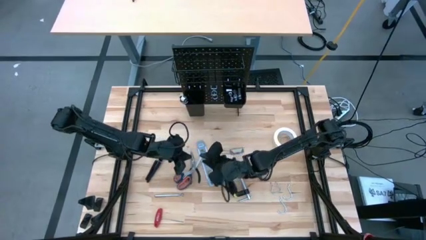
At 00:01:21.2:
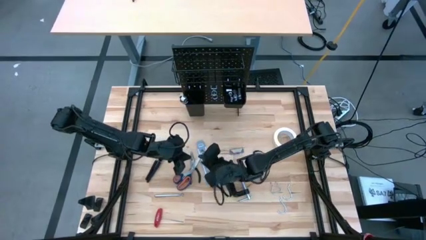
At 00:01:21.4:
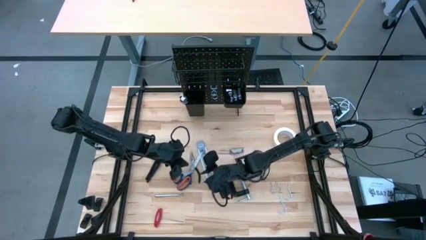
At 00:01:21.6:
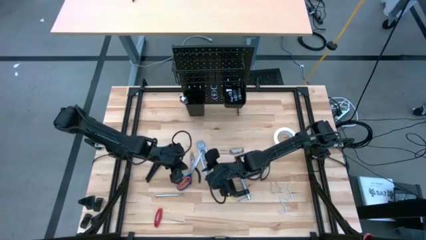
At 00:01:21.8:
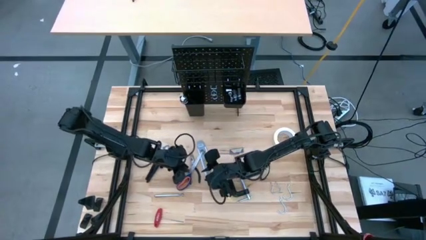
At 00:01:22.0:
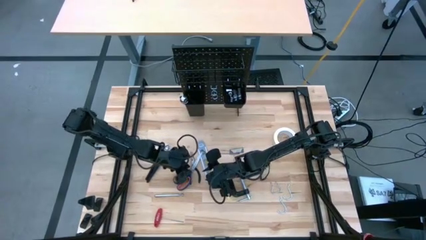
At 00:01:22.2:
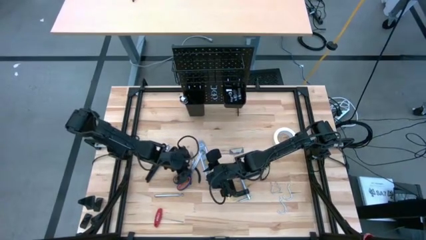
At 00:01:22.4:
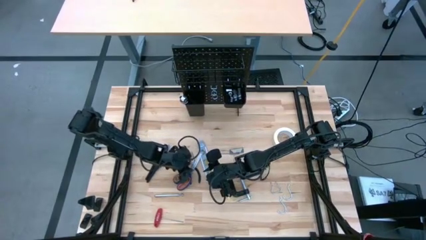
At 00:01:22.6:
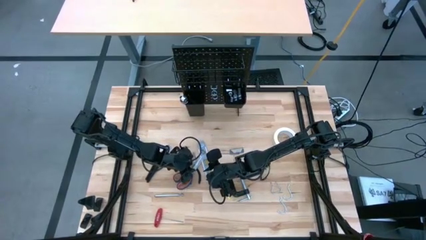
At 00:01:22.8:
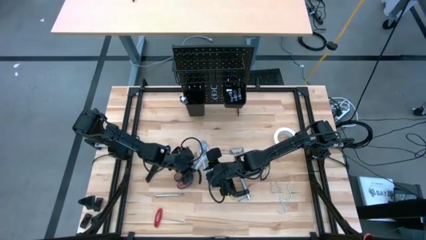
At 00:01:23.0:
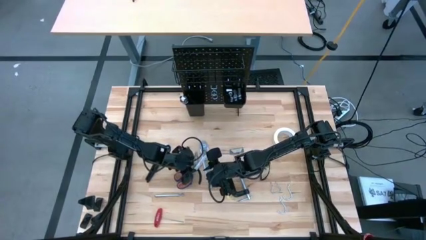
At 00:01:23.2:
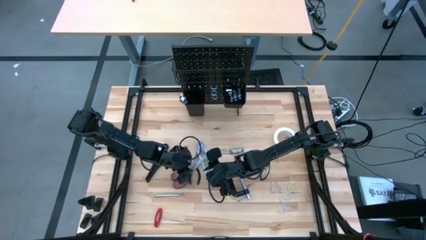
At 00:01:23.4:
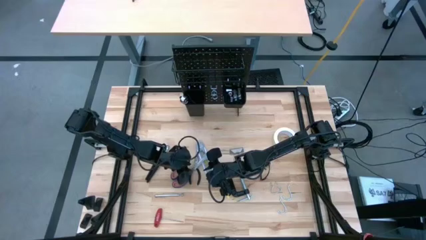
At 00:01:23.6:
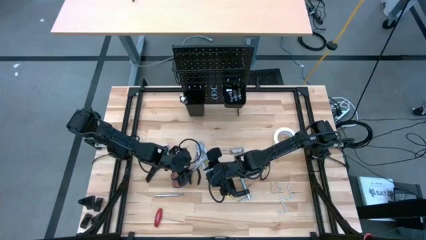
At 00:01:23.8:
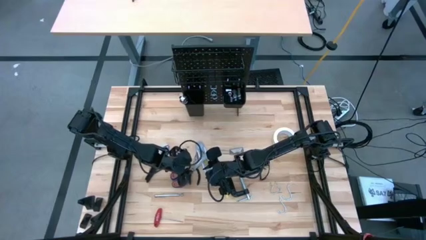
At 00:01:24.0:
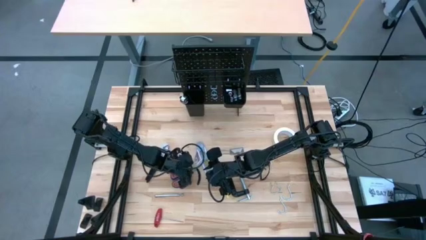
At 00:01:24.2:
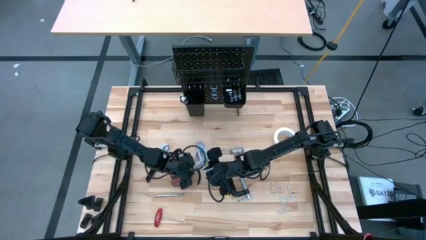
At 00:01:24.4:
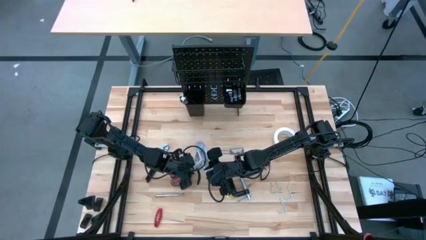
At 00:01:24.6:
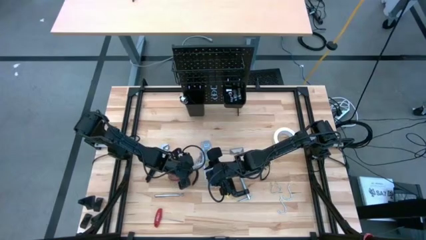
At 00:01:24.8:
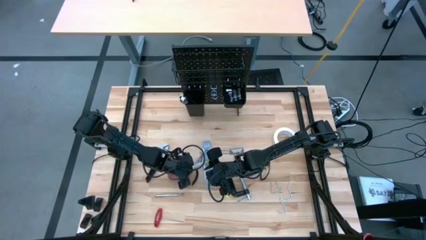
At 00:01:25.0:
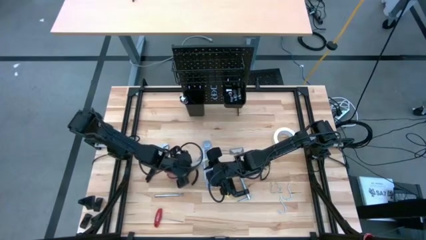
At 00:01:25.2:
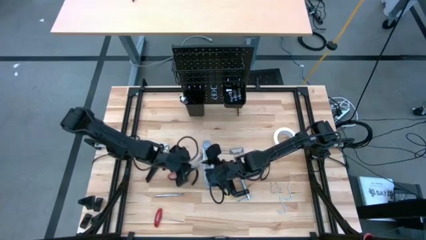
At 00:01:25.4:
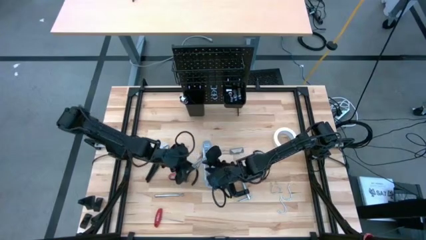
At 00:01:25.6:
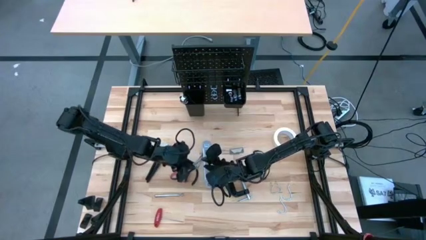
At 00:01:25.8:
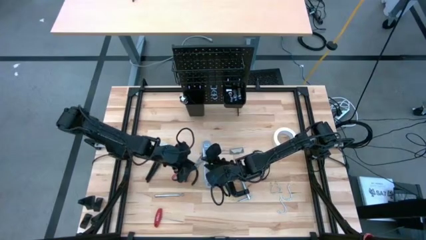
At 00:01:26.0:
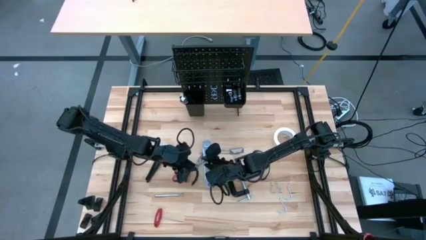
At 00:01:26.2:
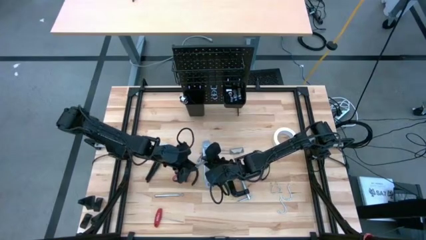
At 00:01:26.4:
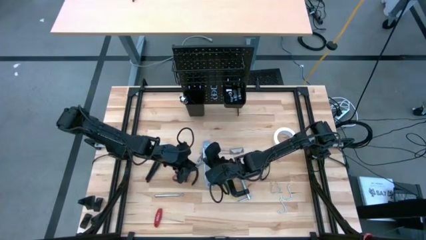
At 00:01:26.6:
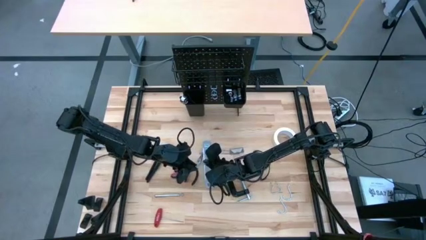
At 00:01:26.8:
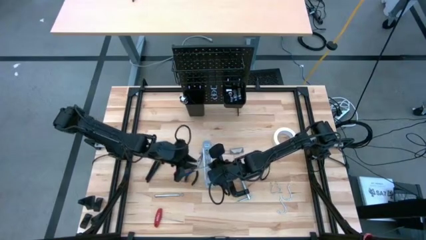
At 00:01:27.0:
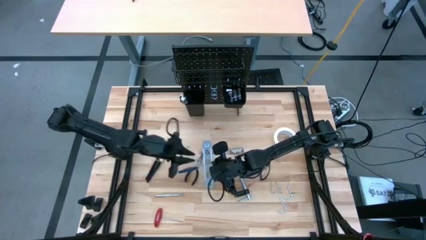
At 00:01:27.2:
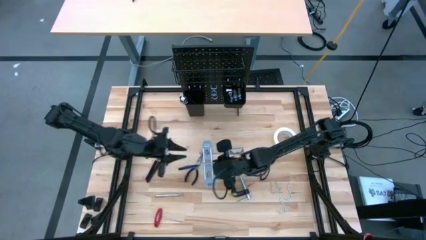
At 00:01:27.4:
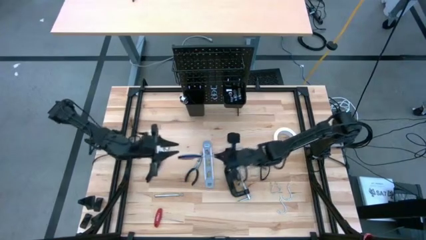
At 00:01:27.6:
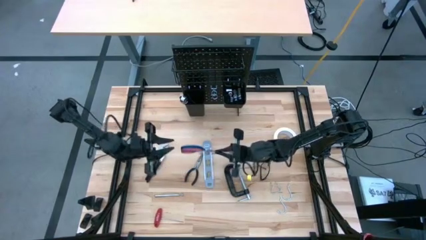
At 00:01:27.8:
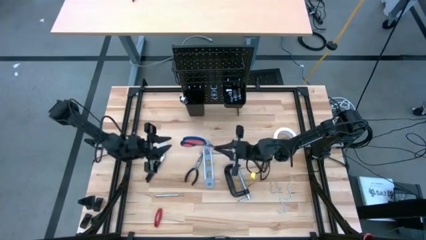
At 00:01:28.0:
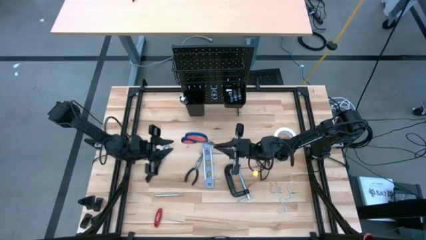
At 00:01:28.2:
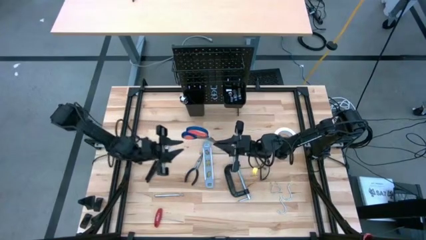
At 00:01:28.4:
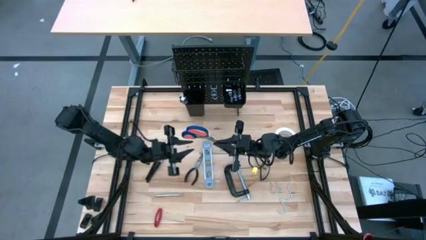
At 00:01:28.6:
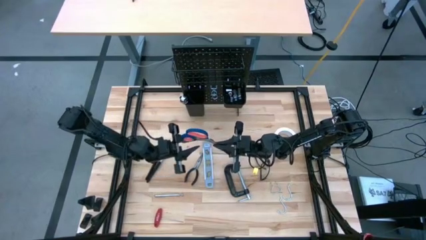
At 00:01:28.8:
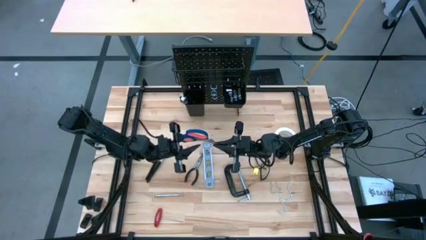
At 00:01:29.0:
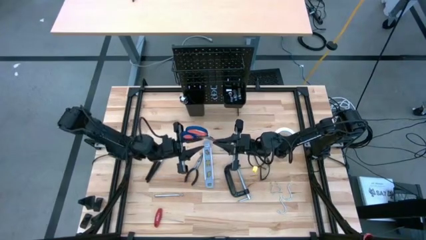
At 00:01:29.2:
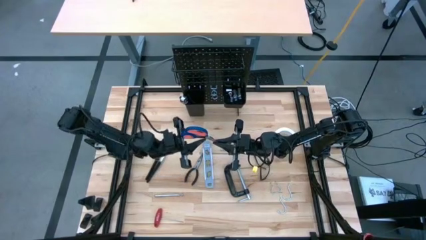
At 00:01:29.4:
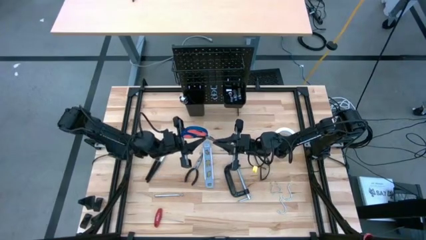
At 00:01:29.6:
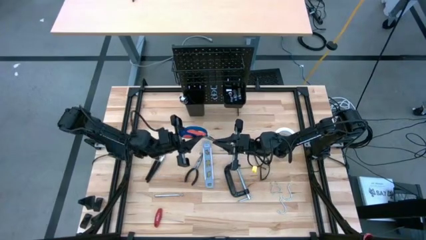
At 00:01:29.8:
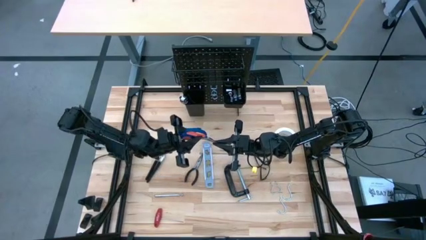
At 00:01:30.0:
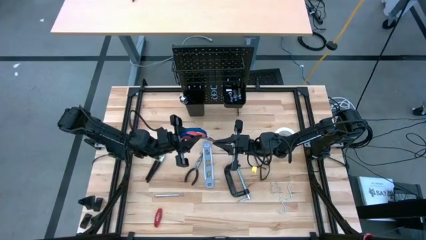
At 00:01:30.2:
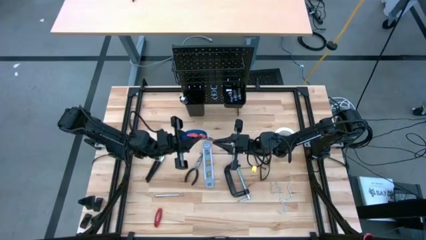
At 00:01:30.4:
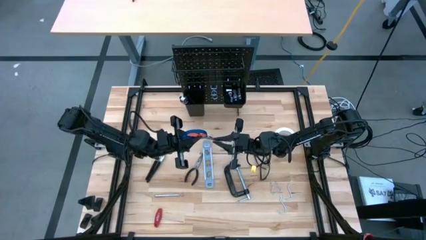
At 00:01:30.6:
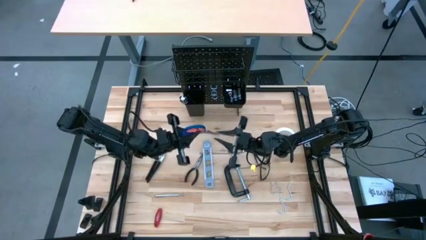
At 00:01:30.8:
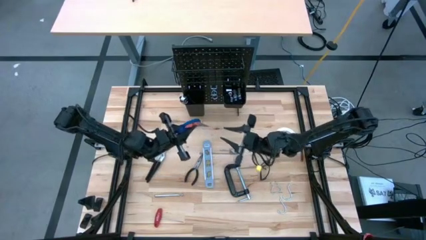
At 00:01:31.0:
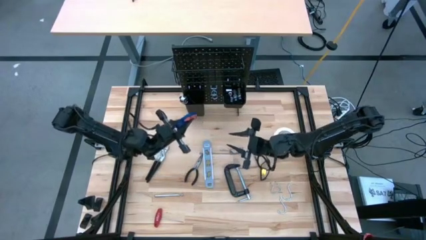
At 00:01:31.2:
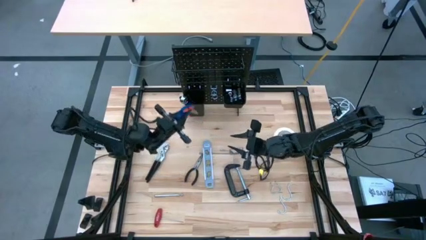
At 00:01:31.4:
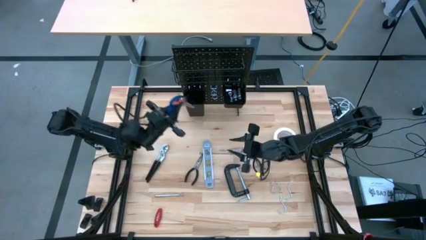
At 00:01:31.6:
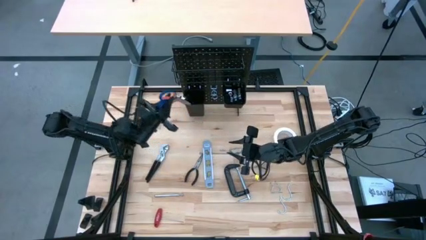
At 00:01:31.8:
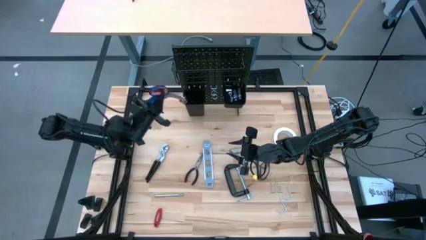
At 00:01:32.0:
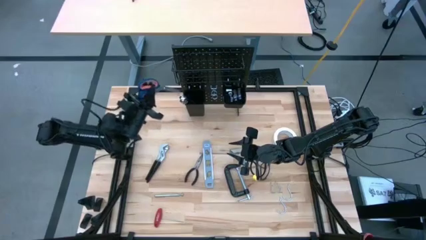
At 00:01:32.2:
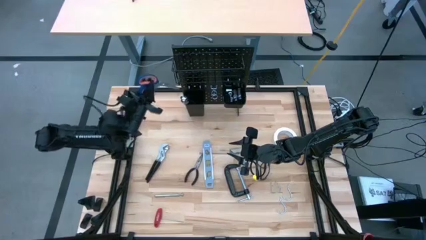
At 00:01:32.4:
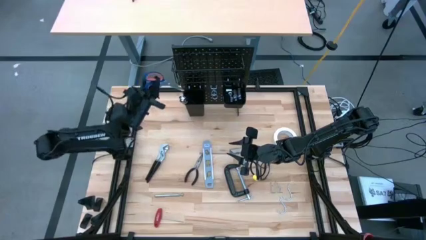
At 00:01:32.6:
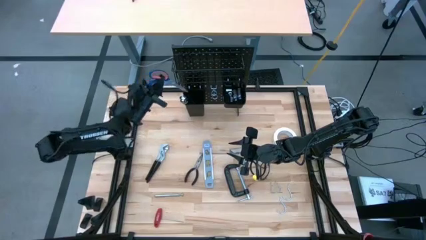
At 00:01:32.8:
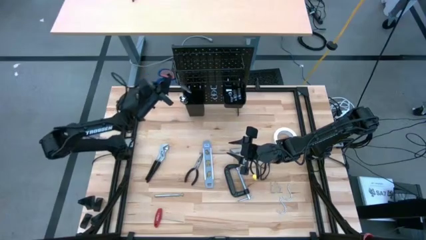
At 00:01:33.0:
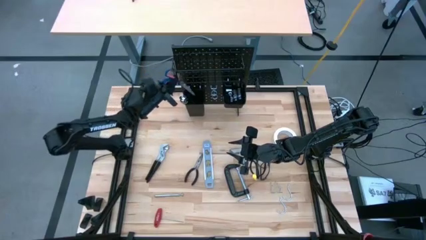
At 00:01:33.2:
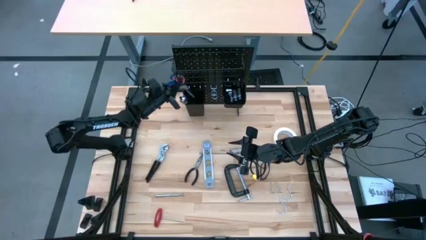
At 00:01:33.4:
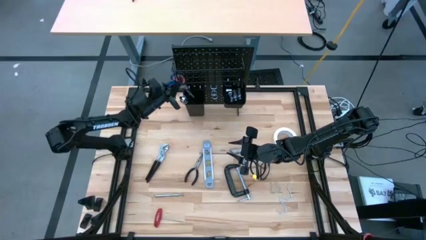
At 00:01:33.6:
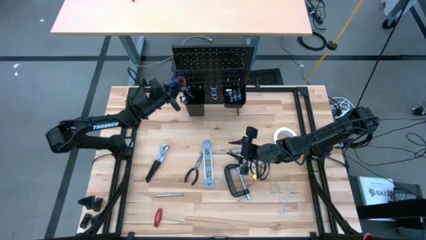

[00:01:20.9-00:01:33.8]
Task: Hang tools onto peg board
Put the blue scissors into the left black bin on the peg board
